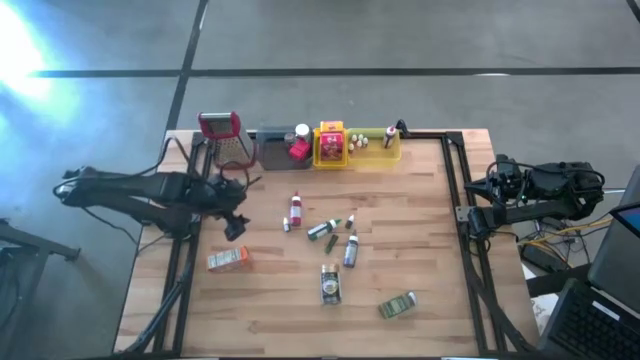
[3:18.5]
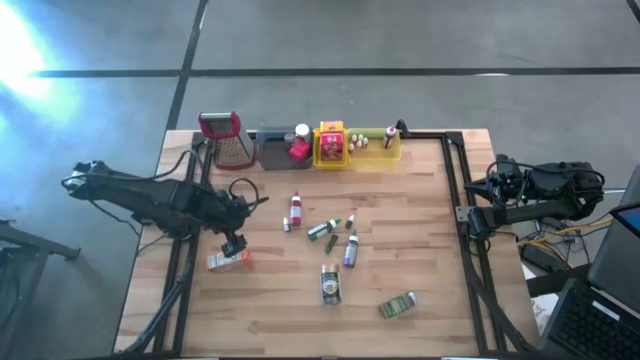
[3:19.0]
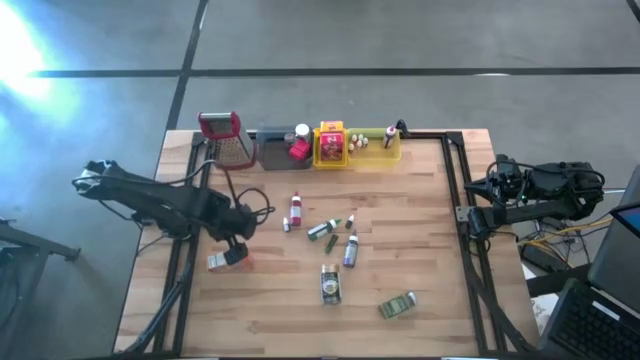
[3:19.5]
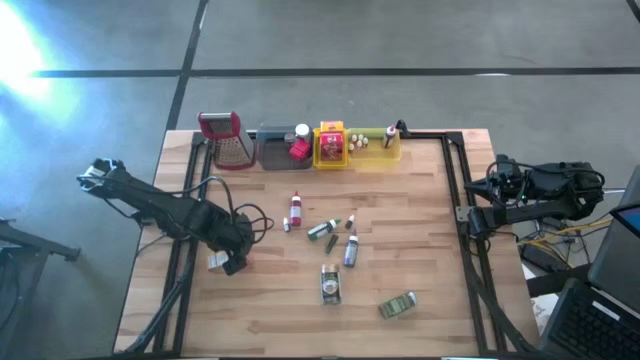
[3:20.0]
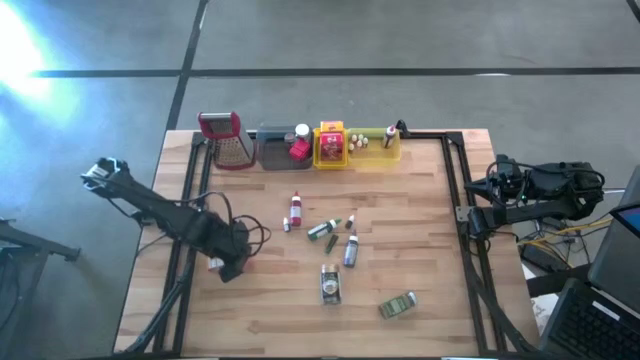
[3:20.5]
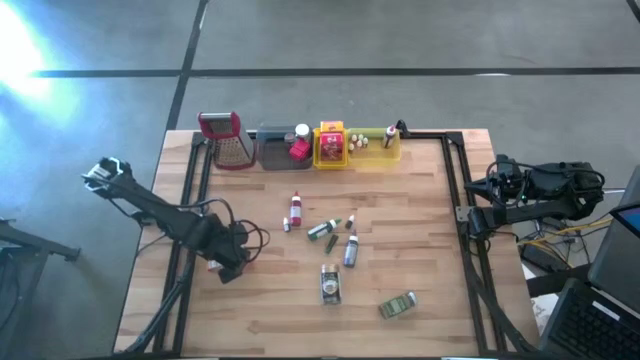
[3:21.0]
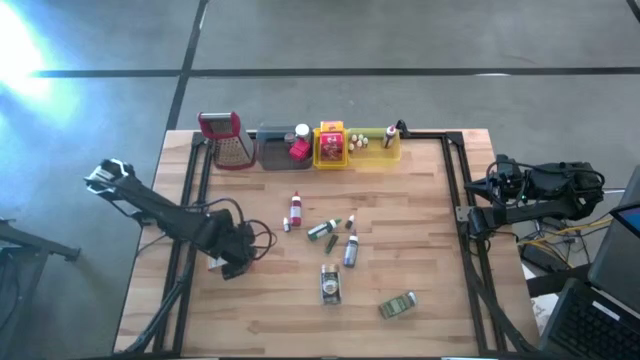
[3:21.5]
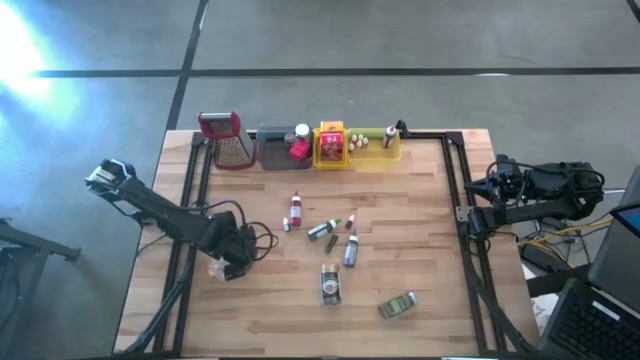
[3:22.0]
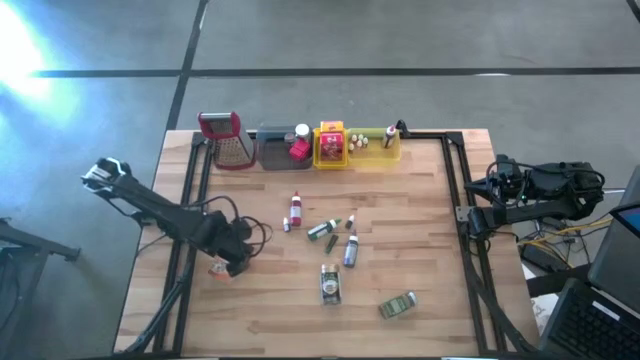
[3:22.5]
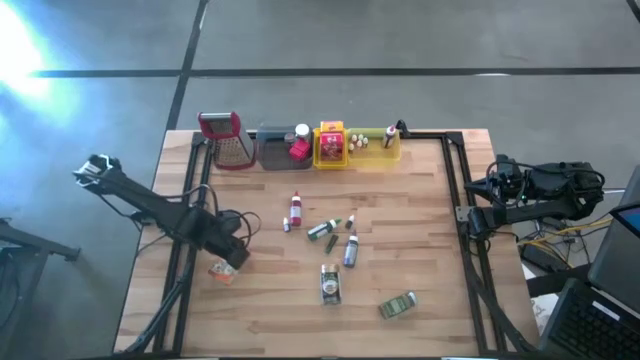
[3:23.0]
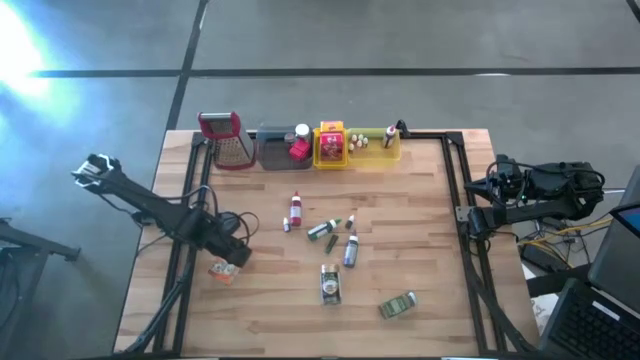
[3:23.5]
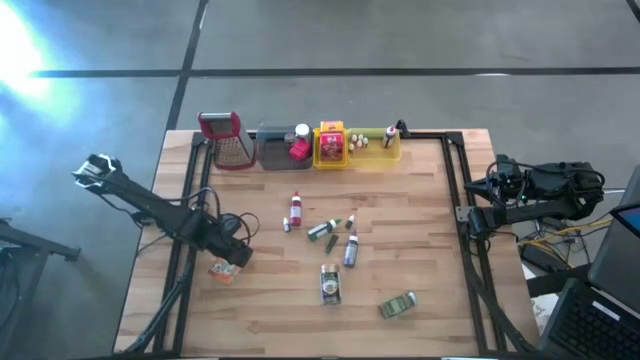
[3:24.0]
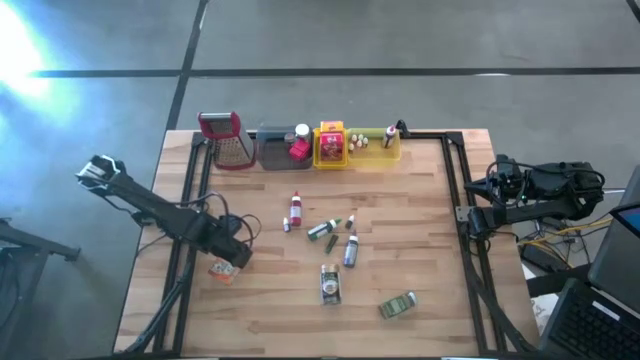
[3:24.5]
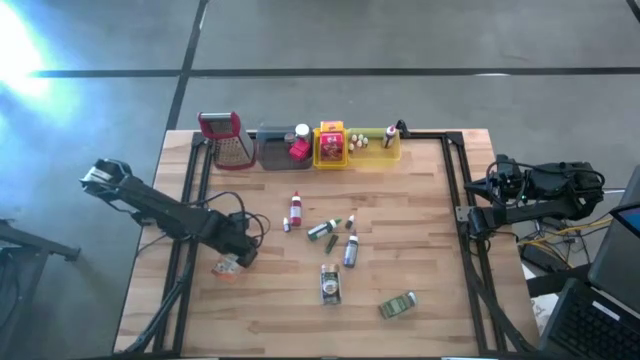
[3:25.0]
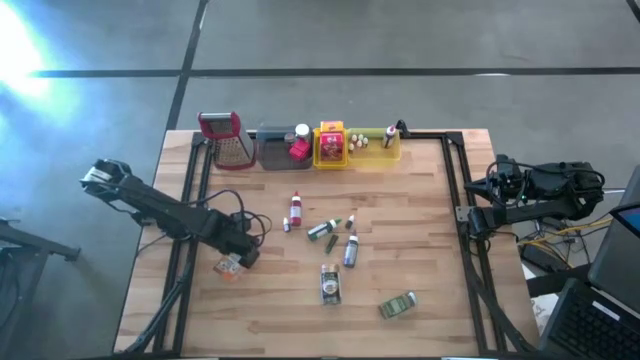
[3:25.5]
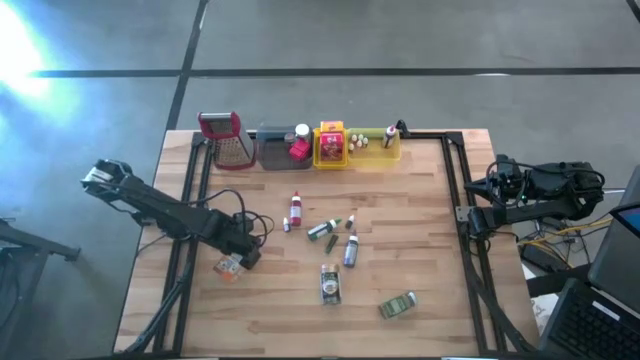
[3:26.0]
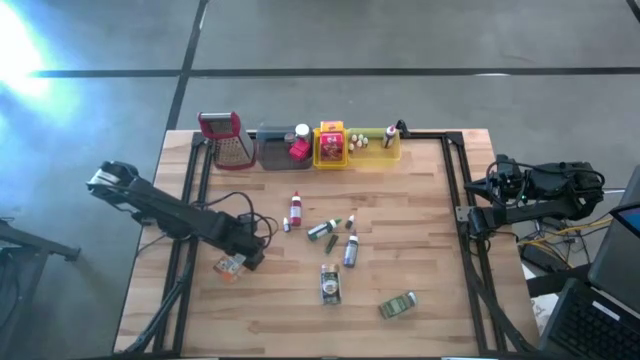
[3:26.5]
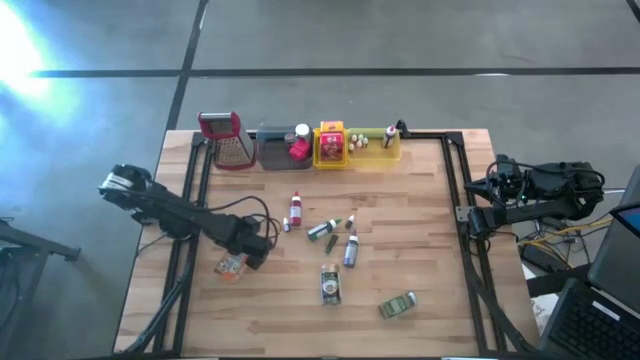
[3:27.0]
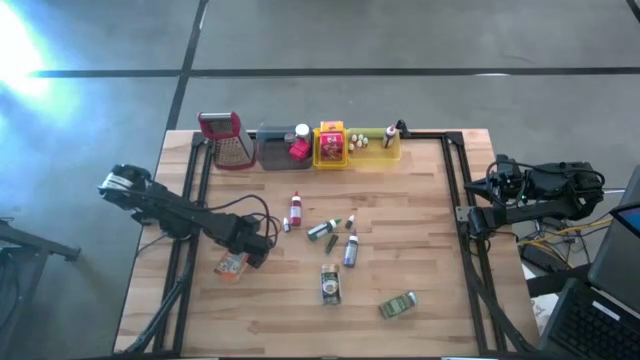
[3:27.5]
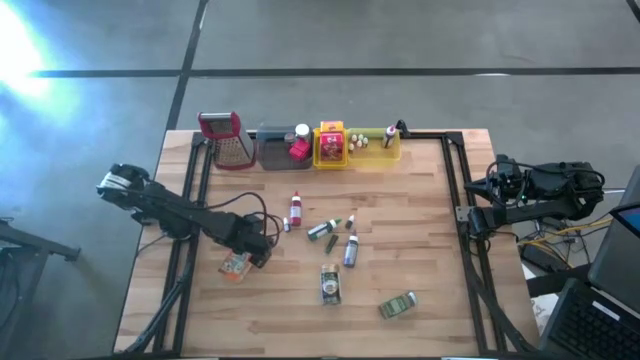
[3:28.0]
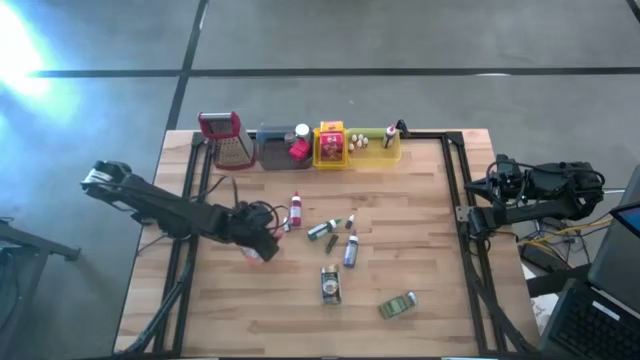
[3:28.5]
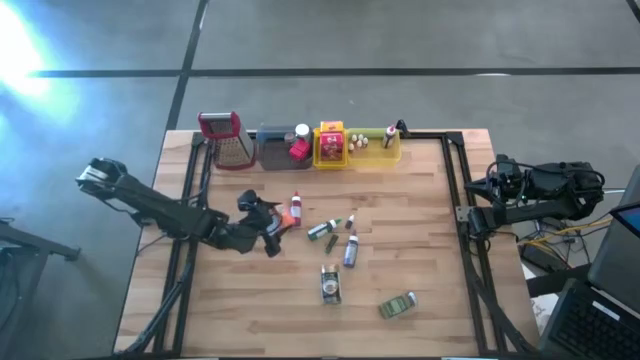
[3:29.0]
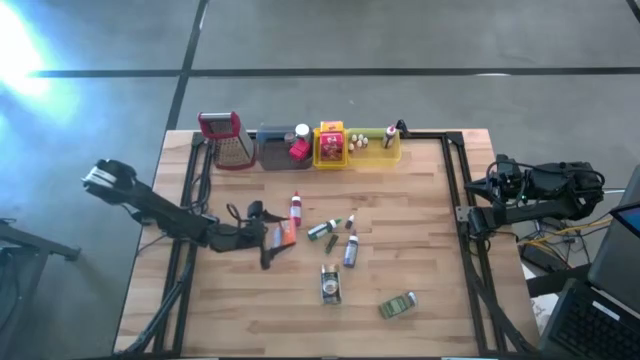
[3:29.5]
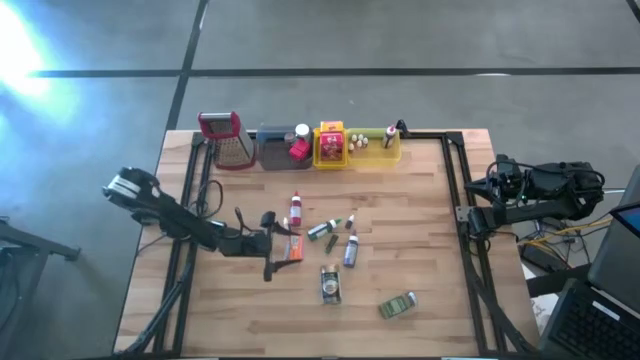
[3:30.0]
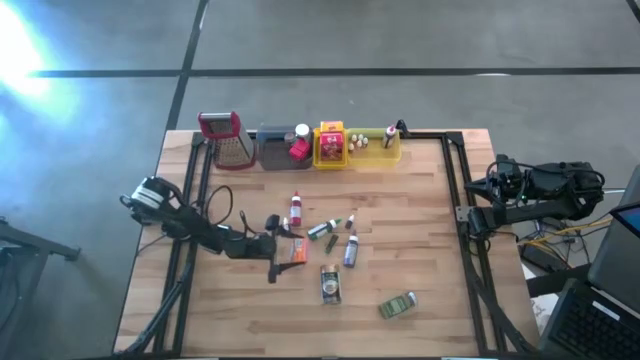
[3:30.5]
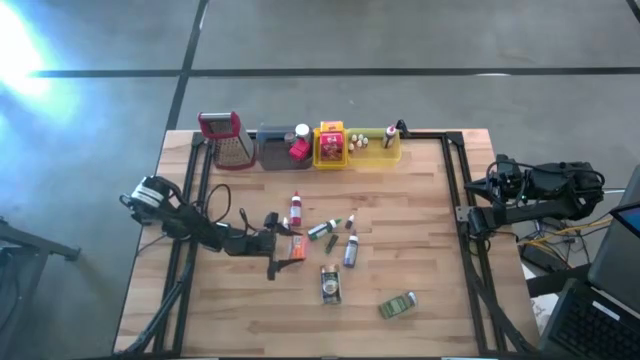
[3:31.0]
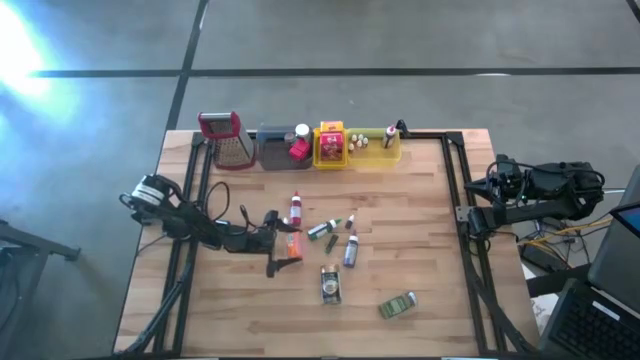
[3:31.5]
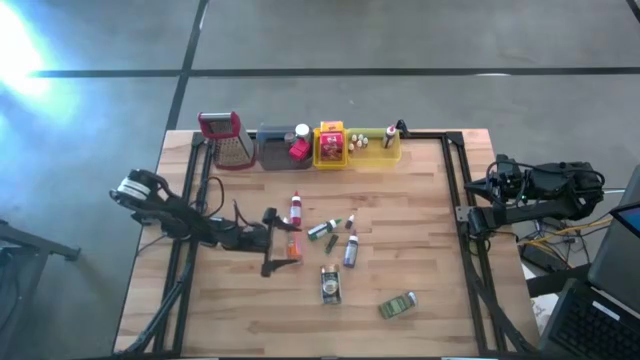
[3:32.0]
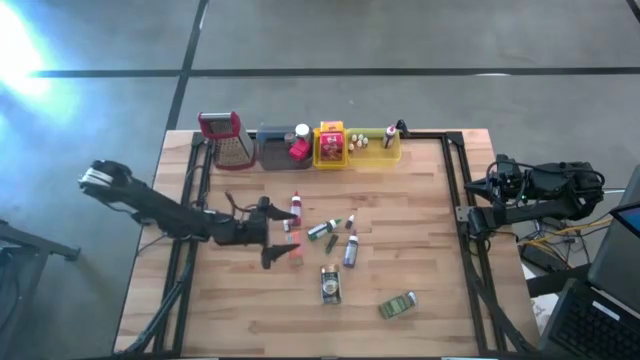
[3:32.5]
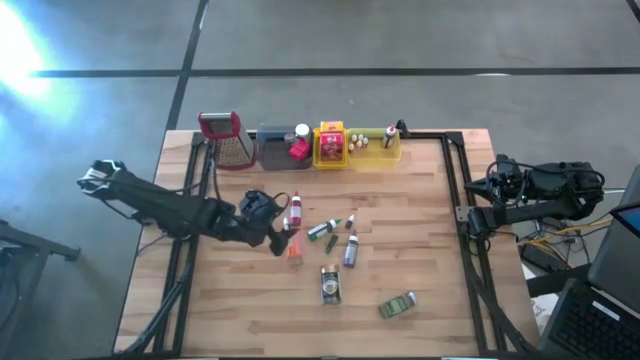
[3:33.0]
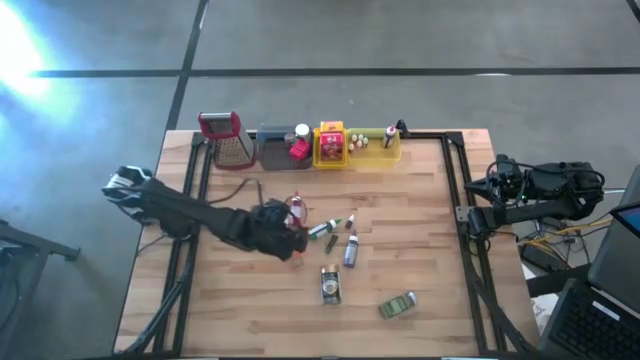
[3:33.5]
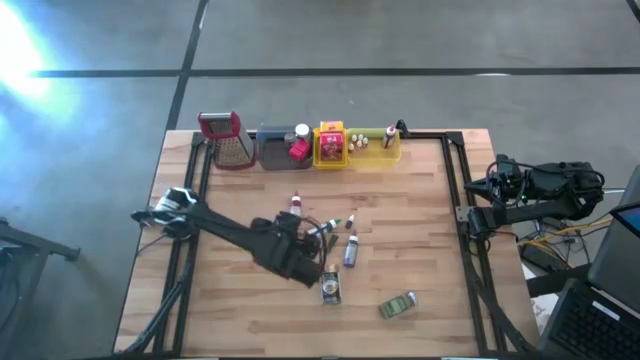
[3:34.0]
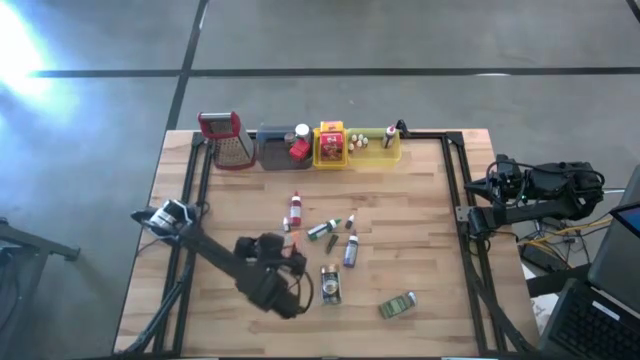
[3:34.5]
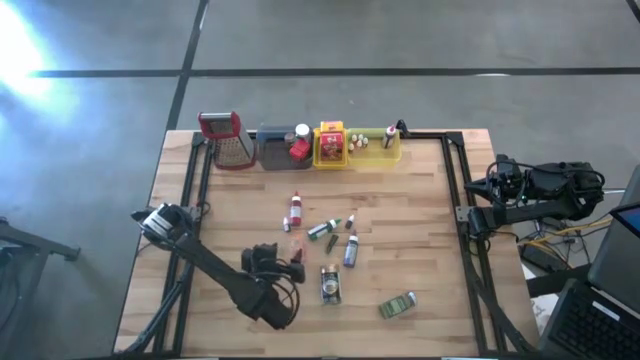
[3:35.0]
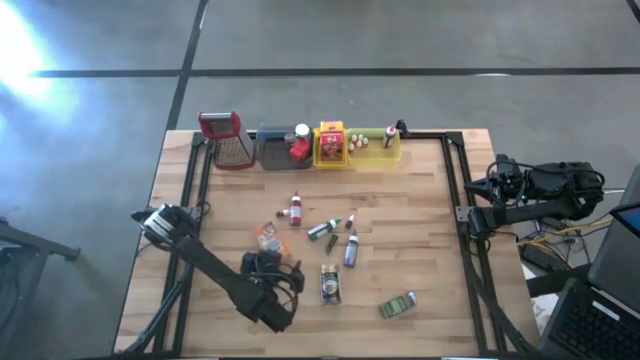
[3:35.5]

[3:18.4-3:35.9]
Task: Pick & Place Kitchen Items
Put the orange cereal box into the yellow bin
